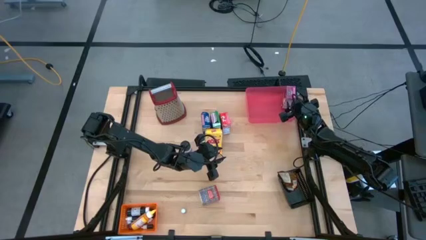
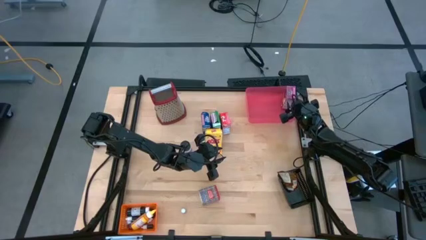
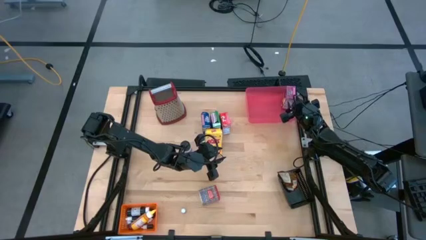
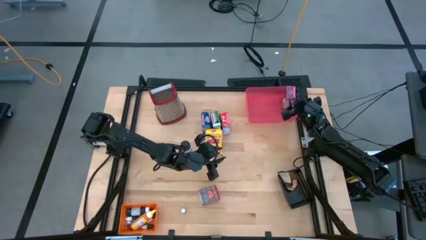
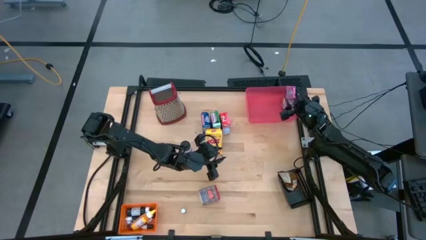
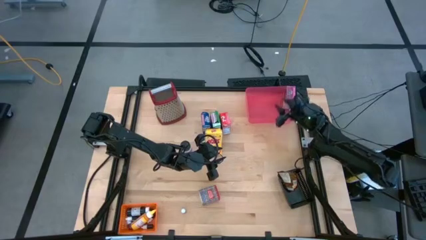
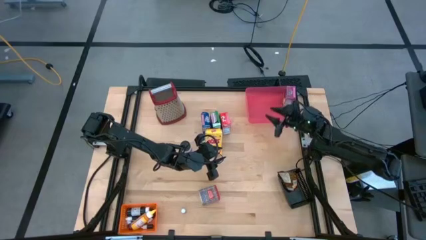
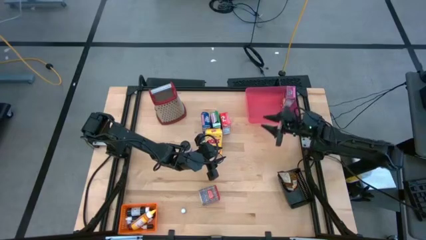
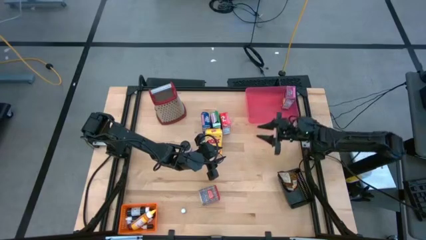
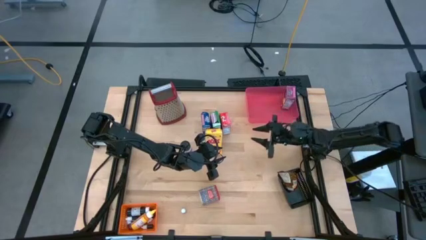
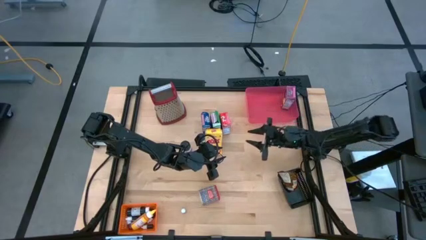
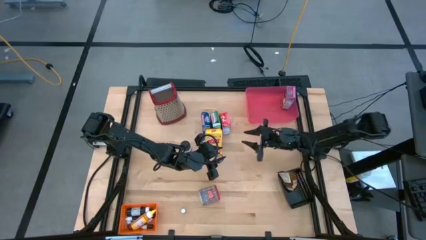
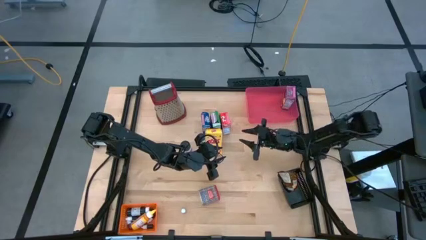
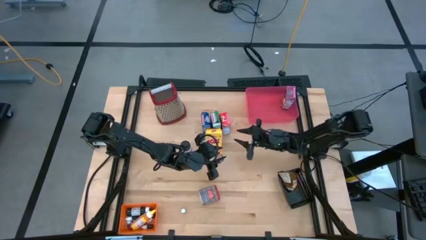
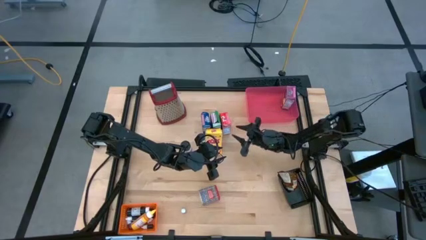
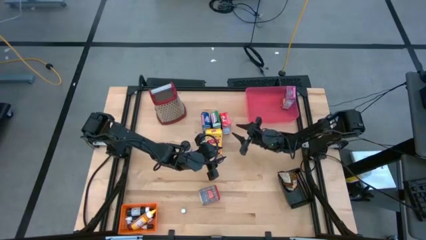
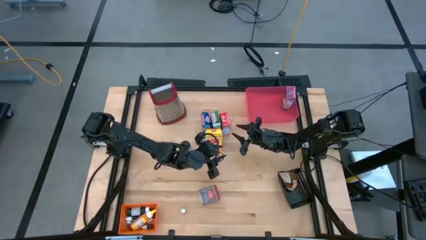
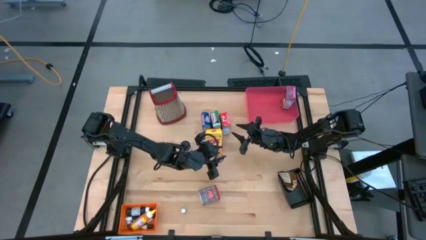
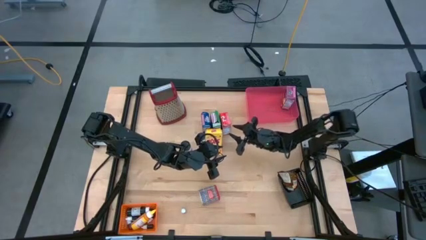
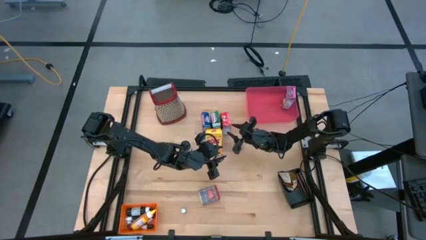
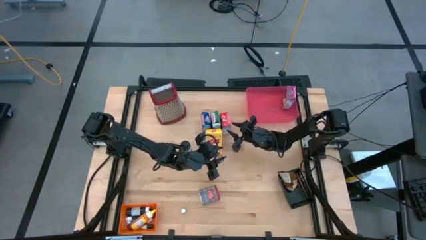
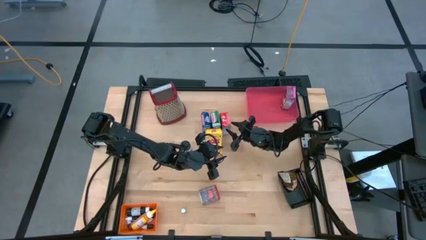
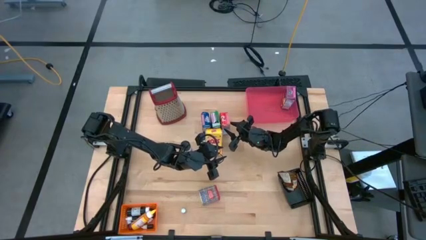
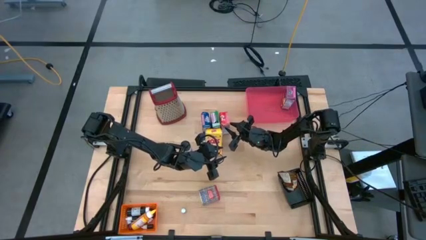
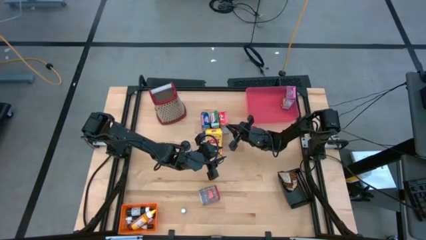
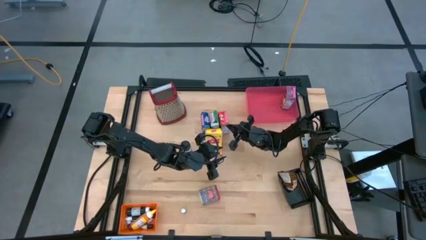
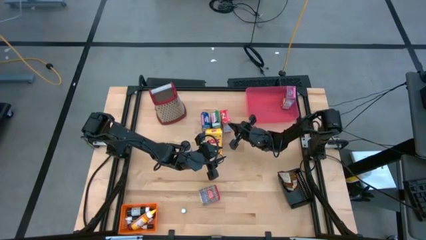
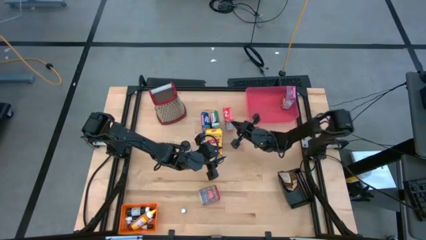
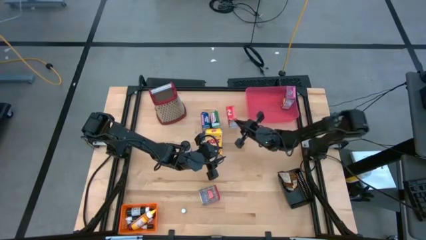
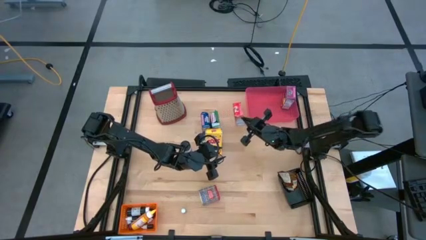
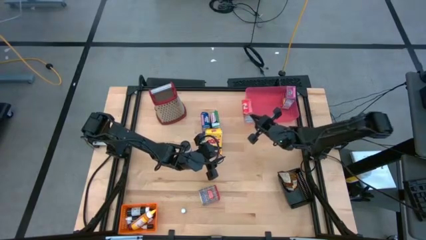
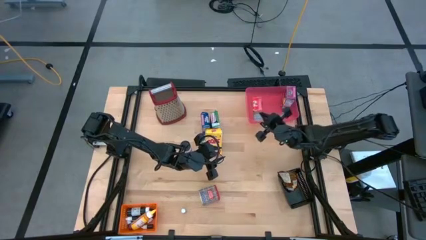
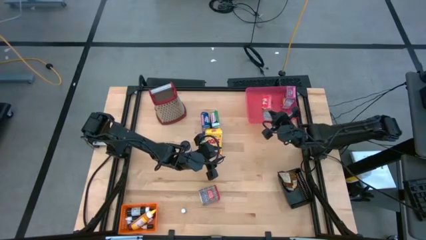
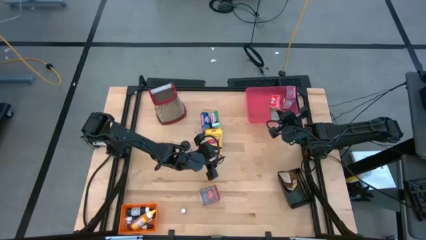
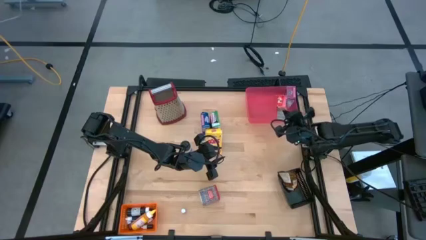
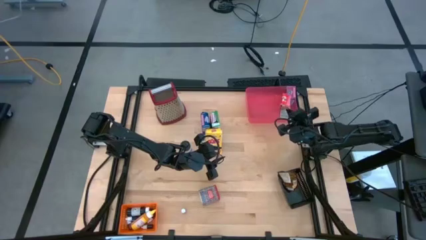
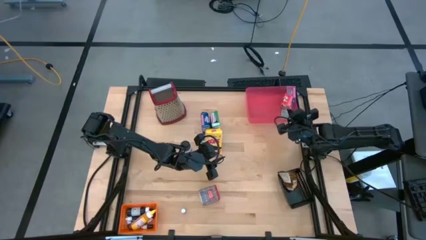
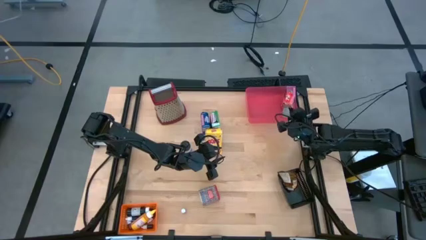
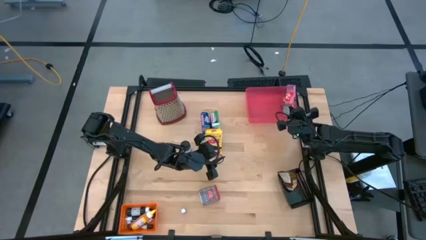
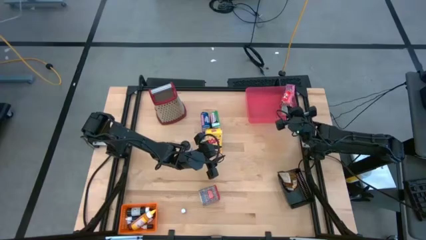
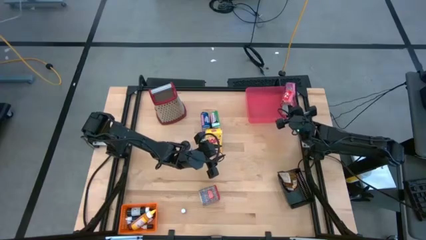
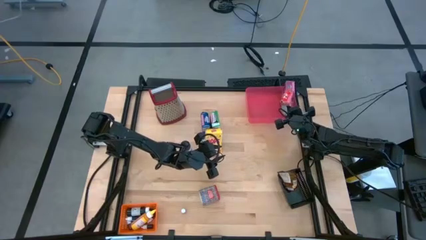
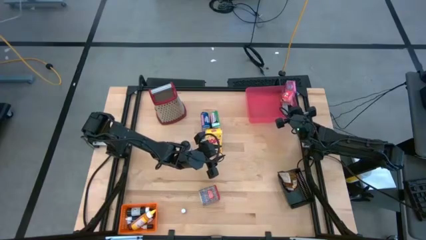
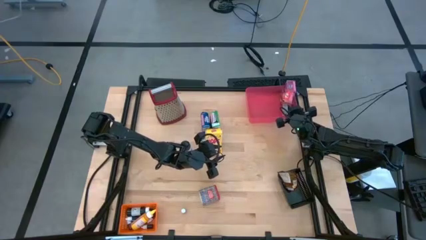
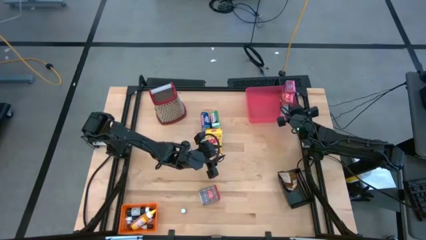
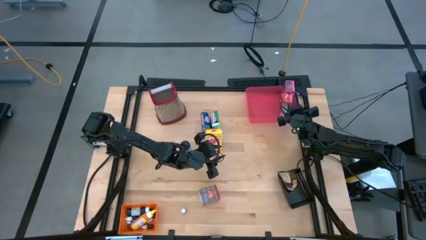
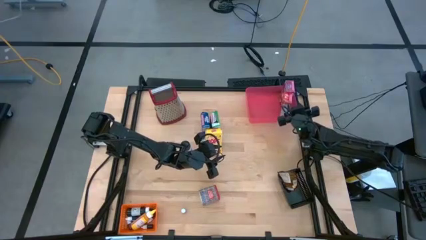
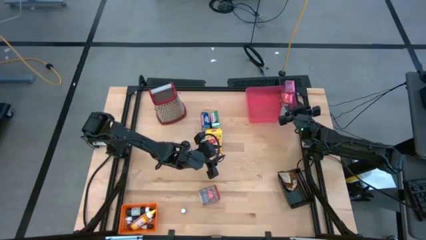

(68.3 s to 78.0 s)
Task: Pick & Place Kitchen Items
Put the red cereal box into the pink bin

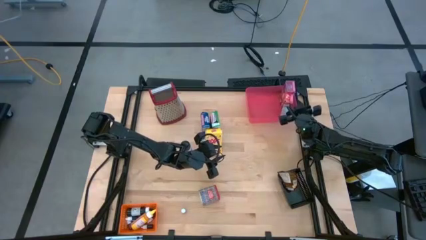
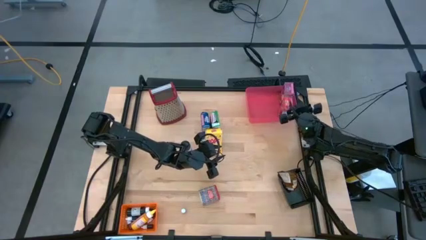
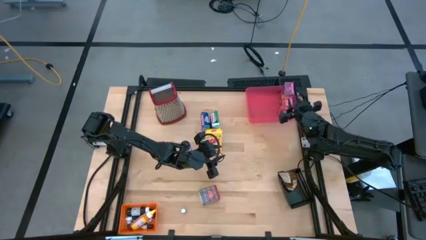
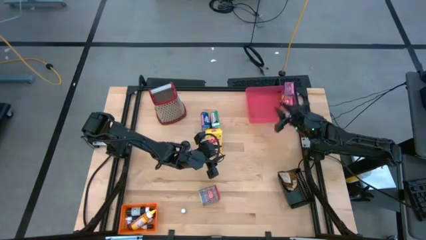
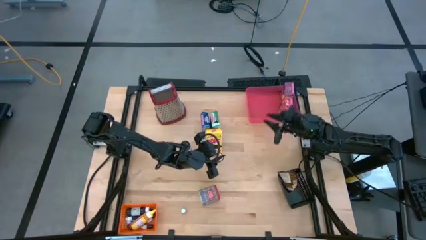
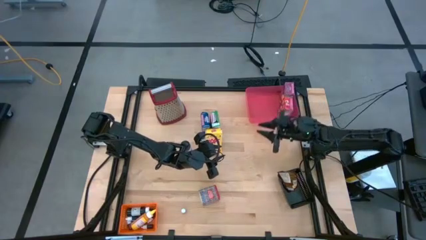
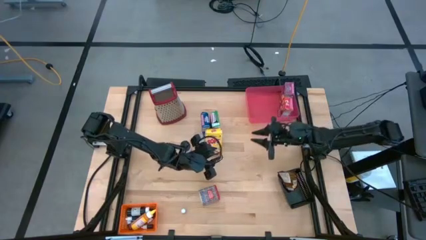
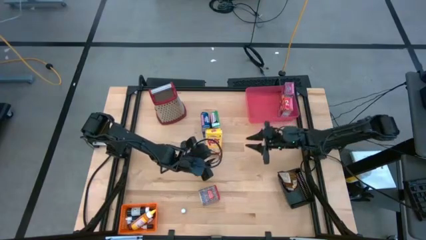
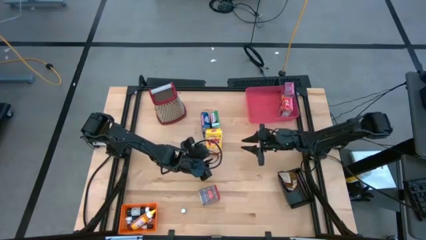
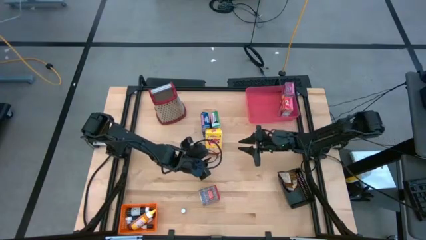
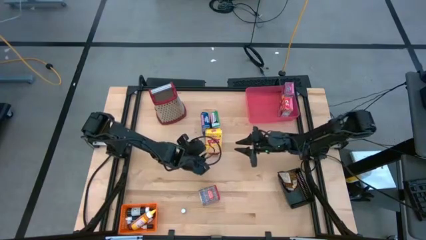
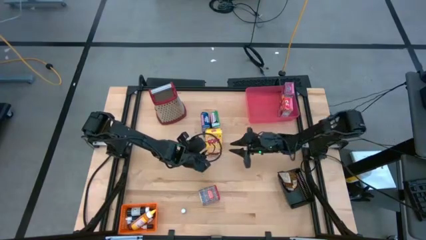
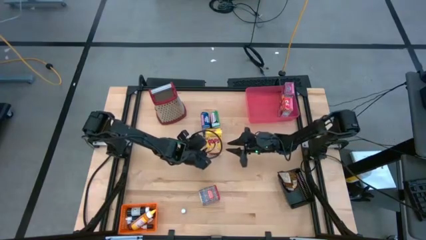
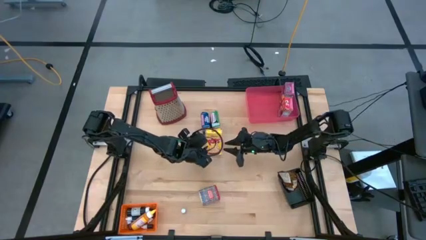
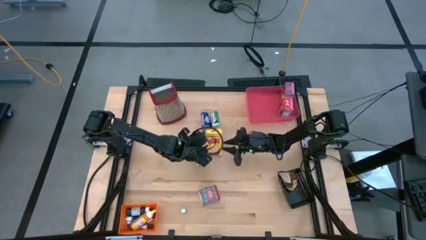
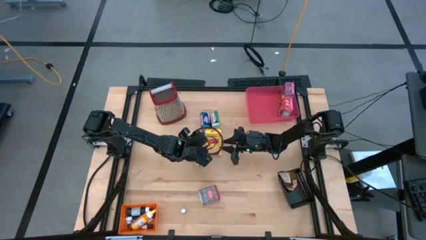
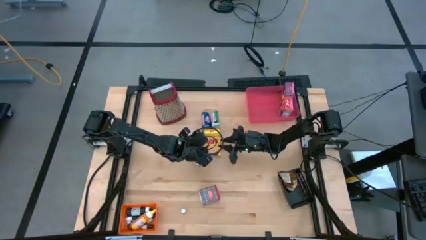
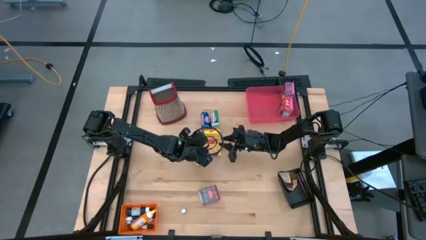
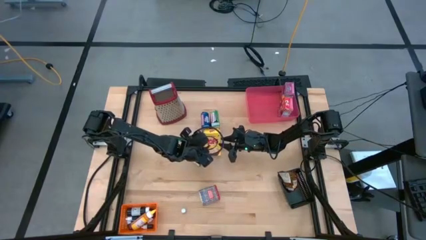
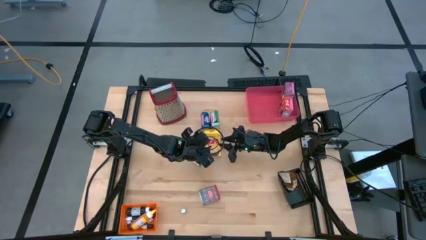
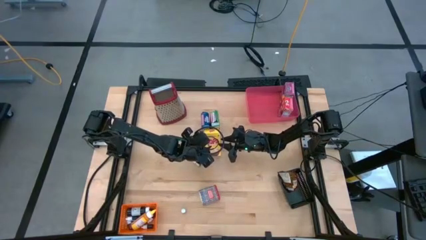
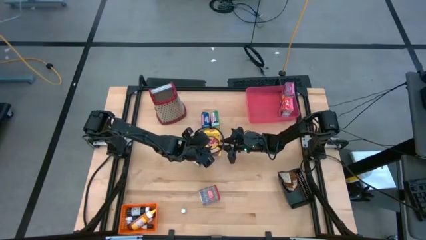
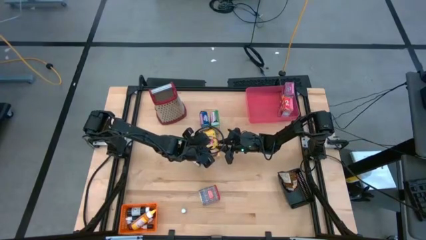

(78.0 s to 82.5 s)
Put the yellow cereal box into the pink bin
